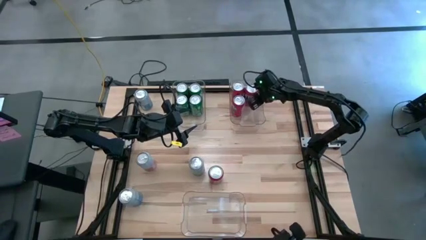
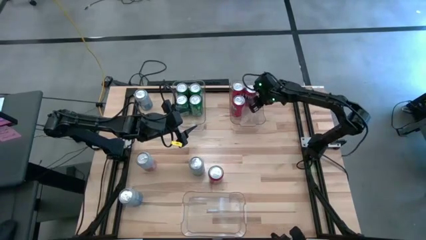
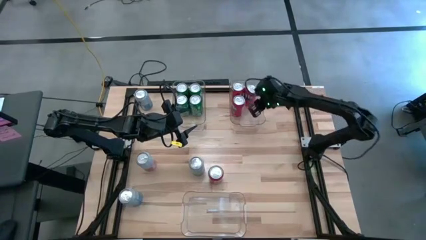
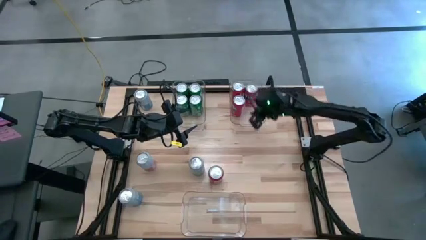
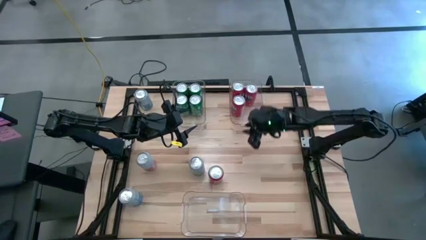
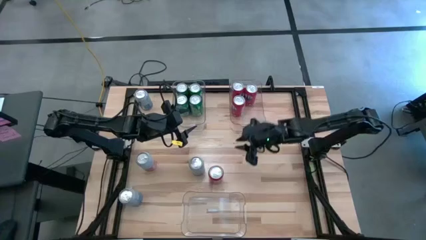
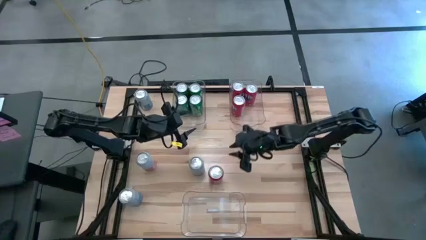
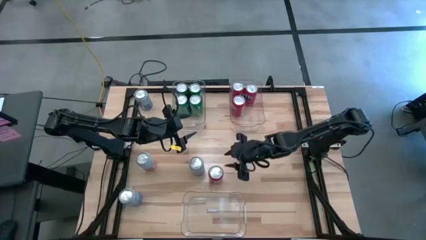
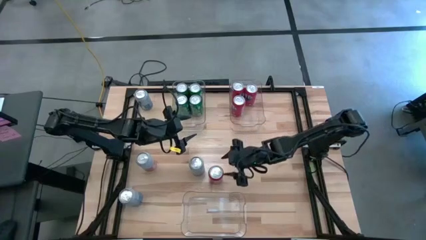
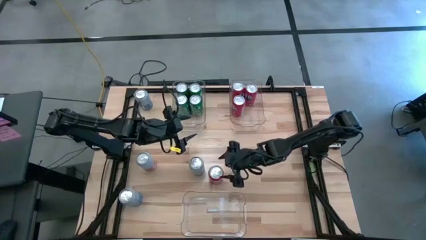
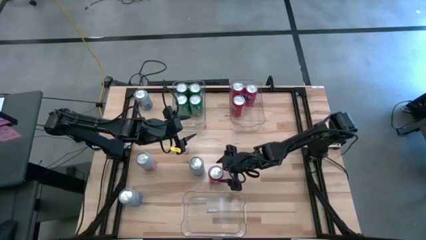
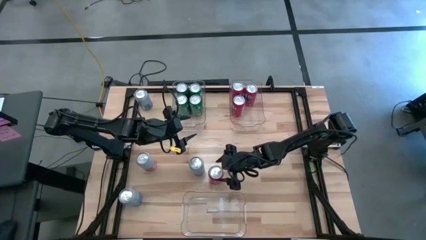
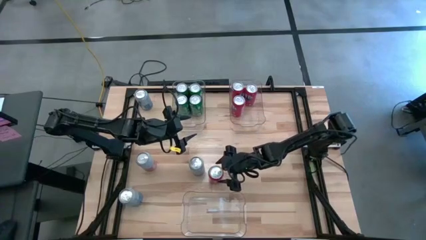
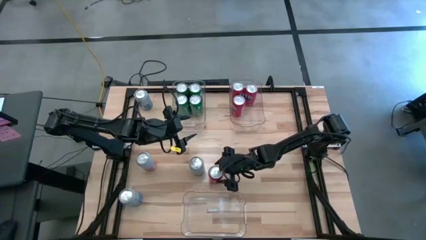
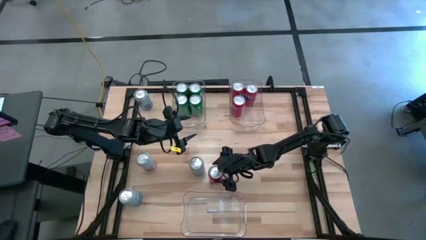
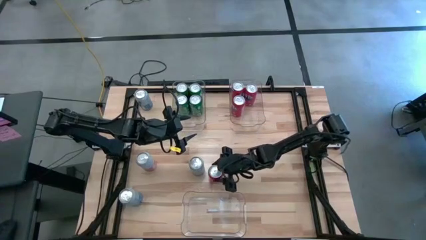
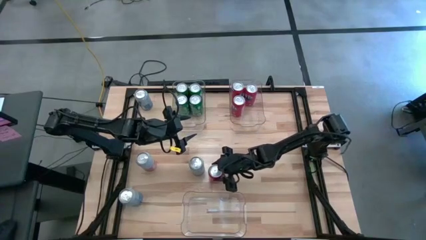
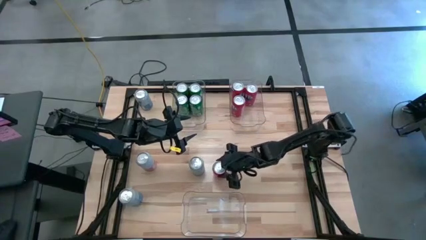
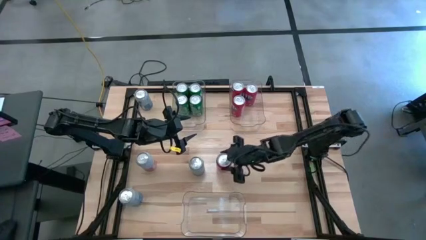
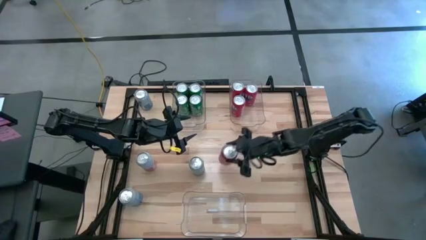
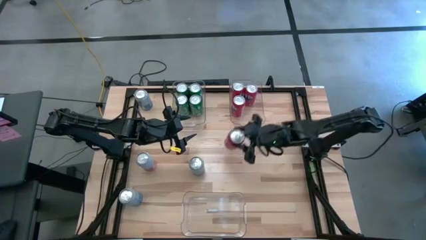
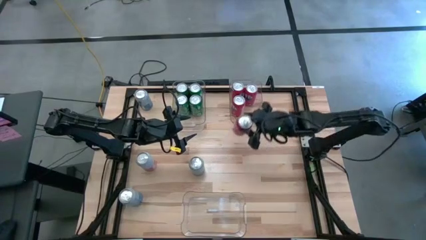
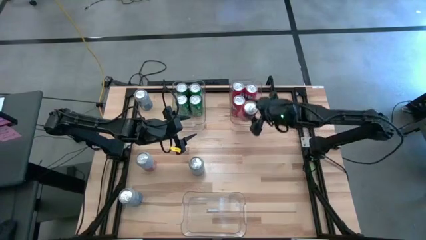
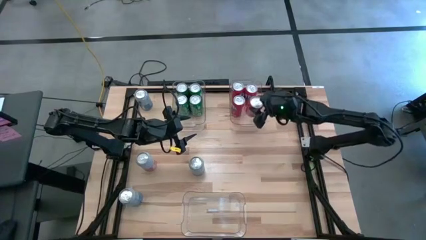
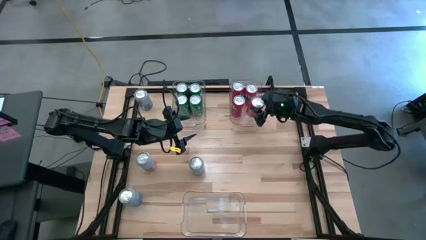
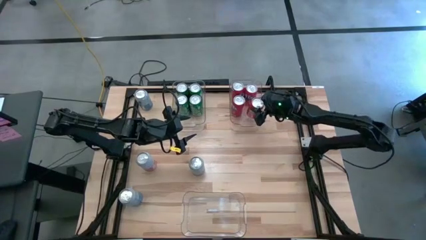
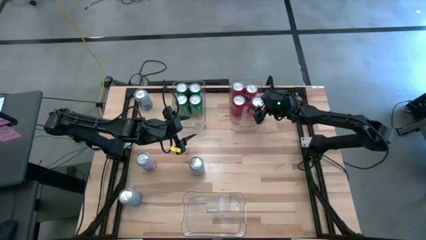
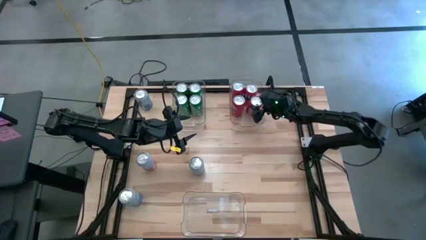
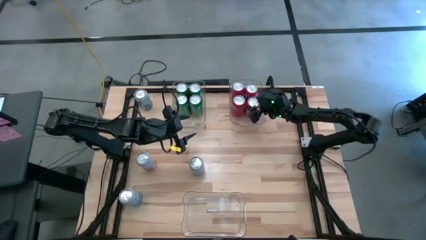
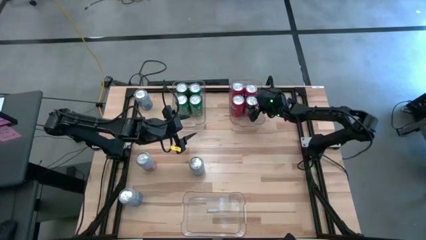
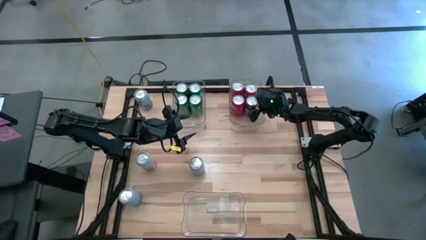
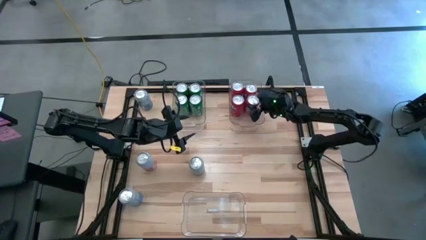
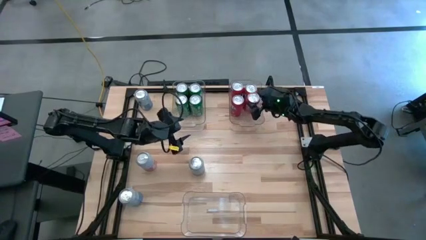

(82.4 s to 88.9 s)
Task: Sort soda cans
Put the red soda can into the top right transparent bin

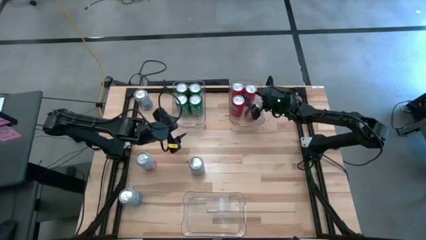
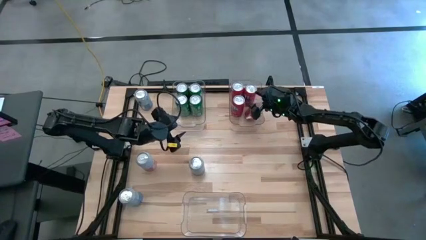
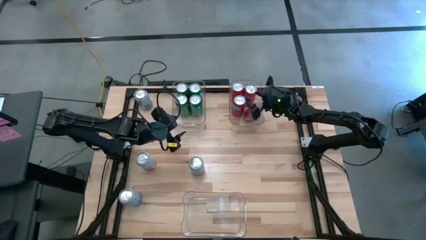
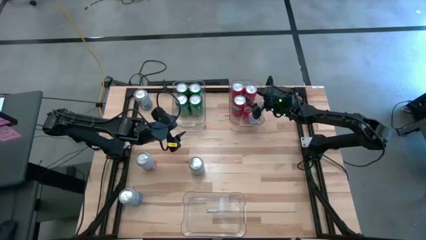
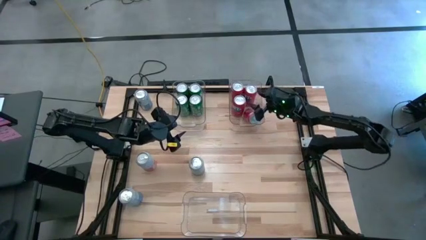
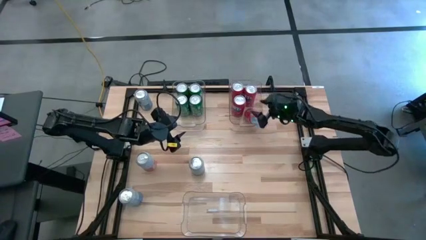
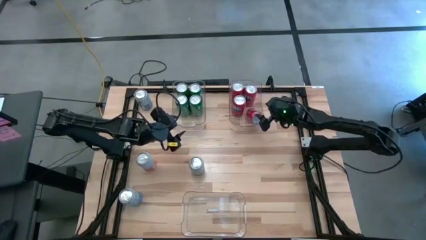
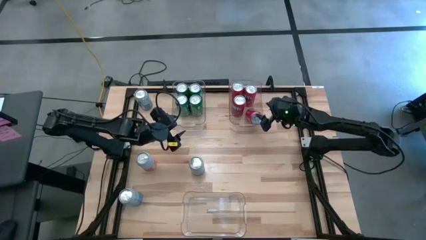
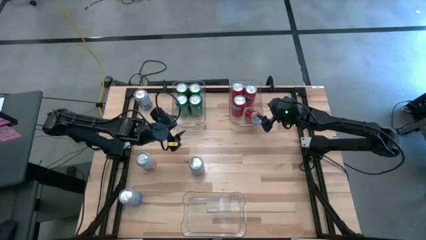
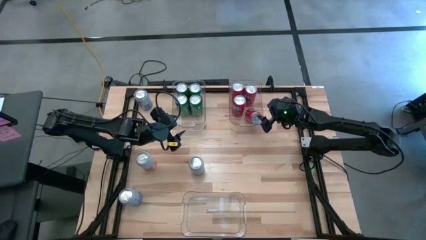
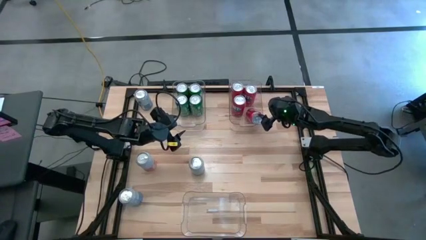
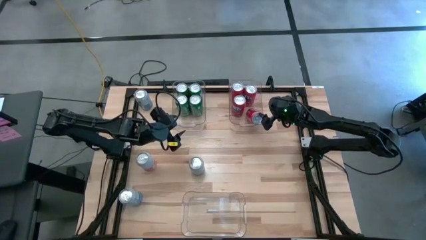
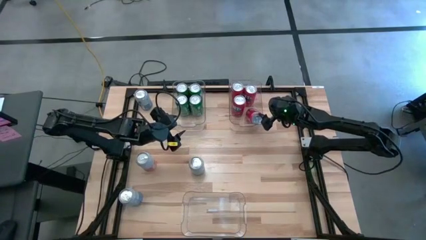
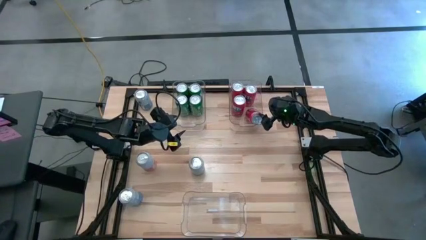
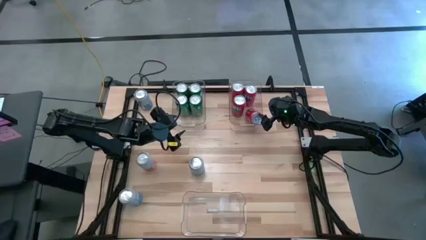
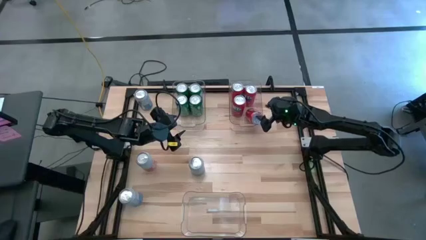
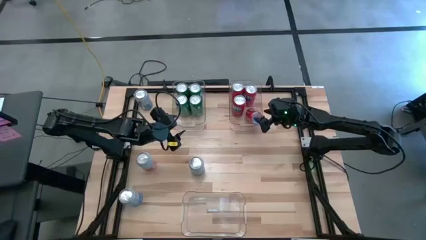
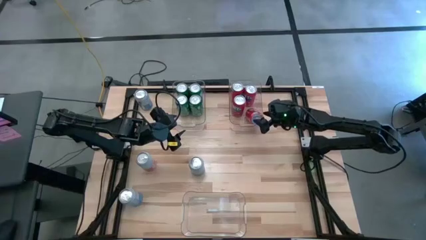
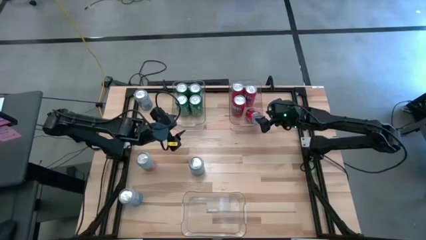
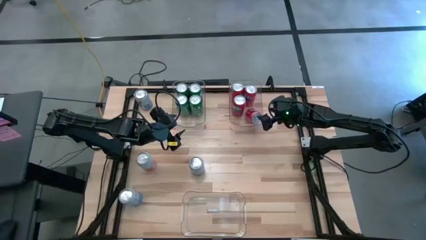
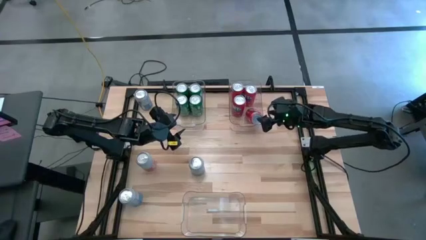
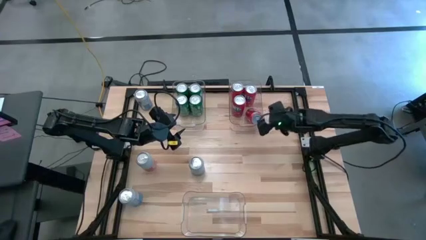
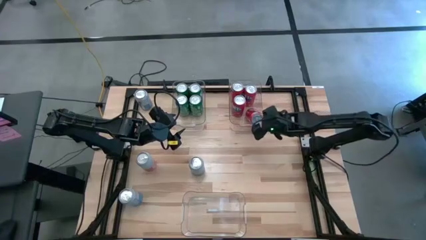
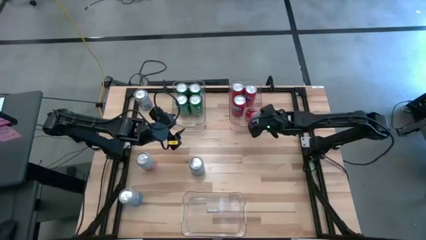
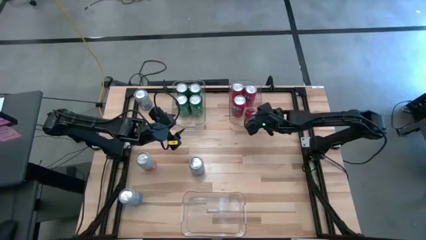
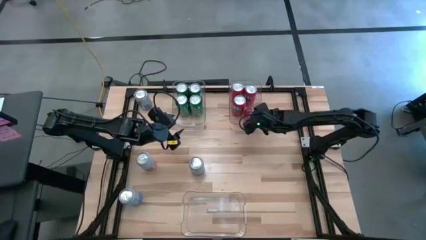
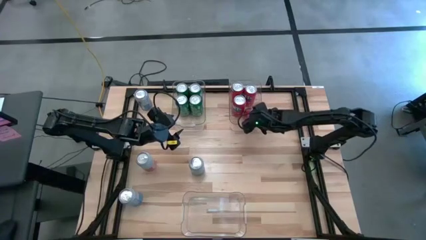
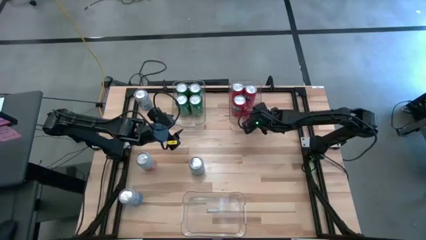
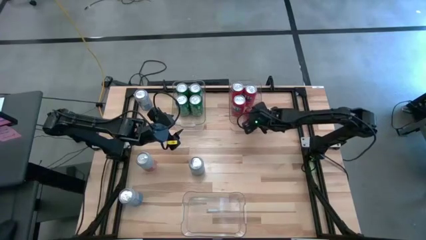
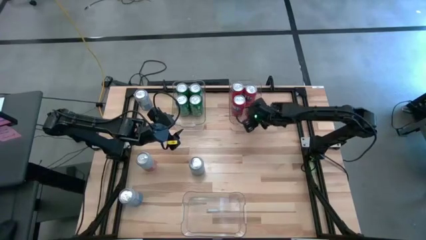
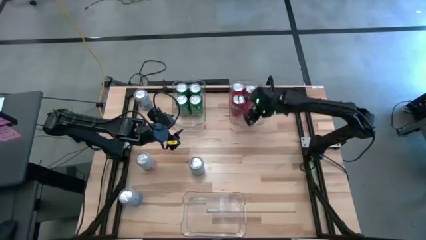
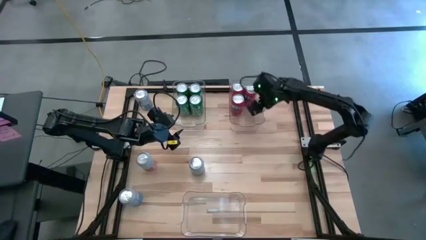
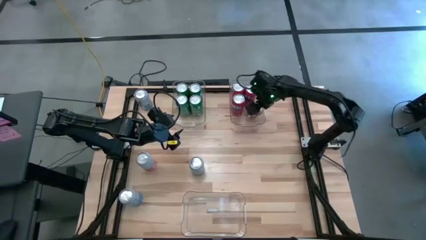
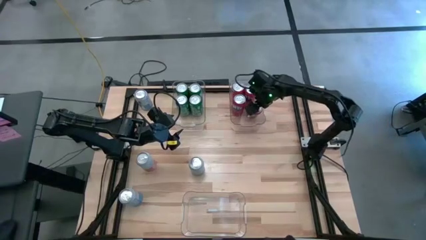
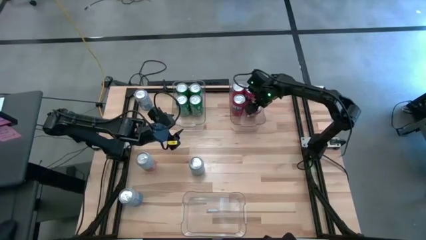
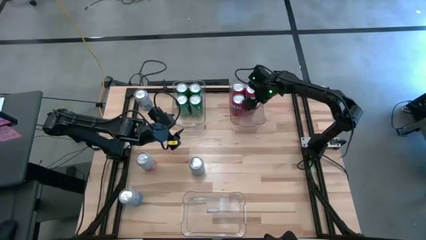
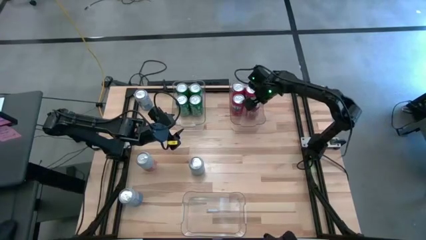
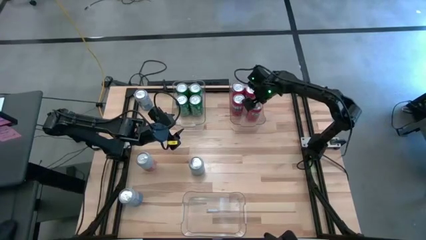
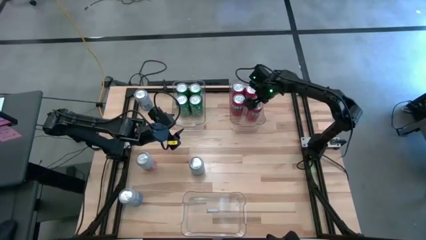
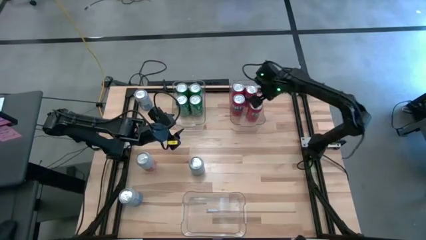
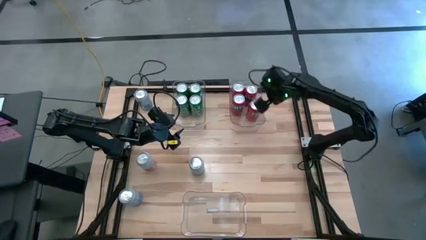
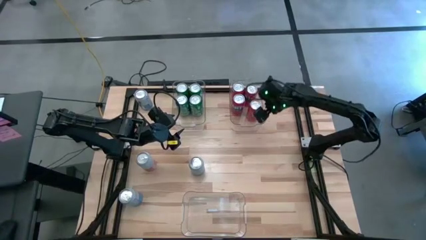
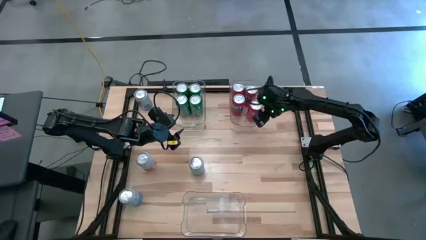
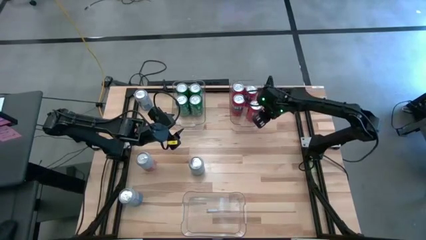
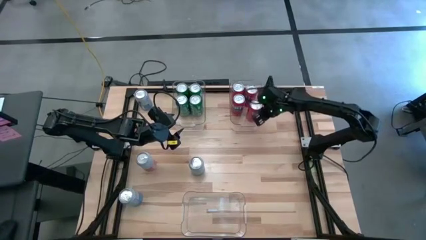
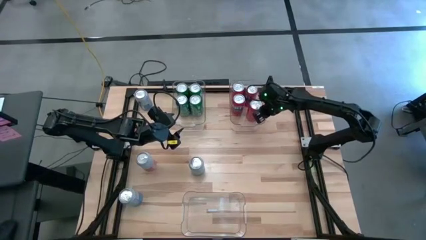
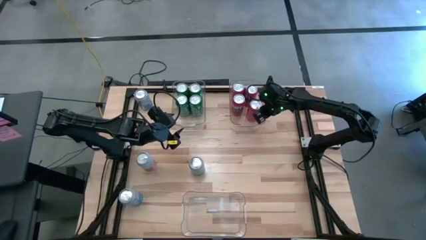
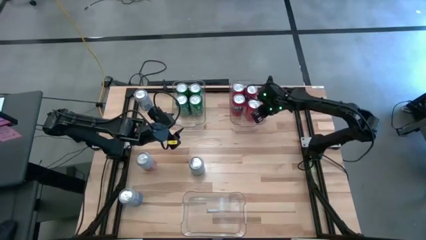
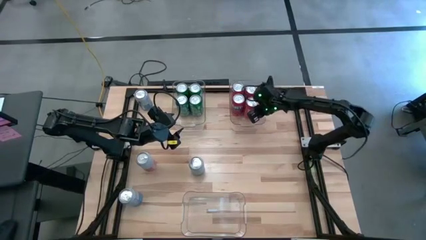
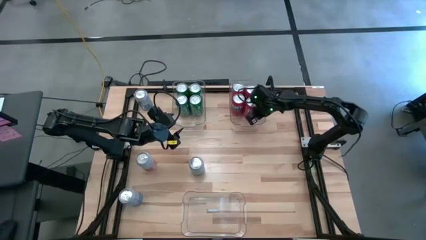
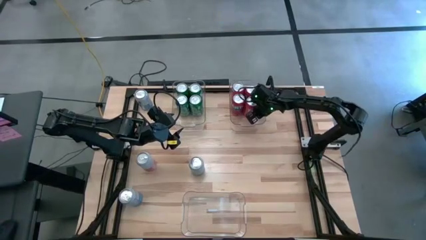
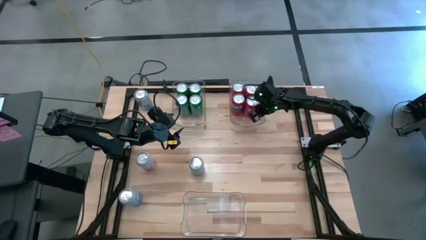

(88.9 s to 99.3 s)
Put the red soda can into the top right transparent bin
